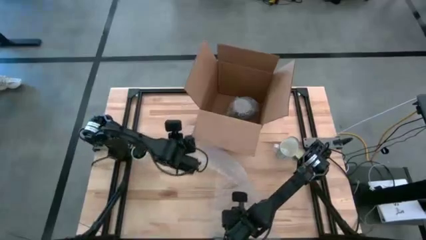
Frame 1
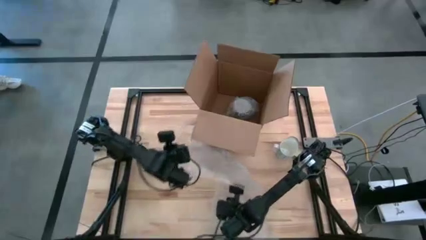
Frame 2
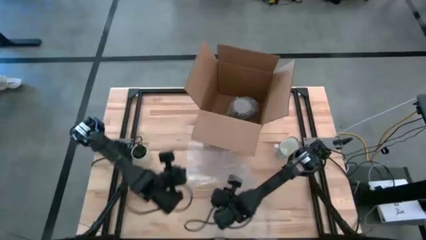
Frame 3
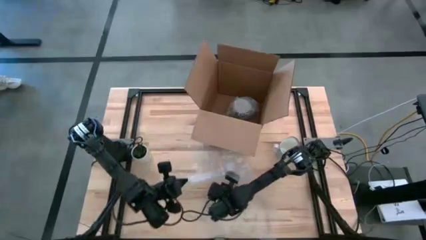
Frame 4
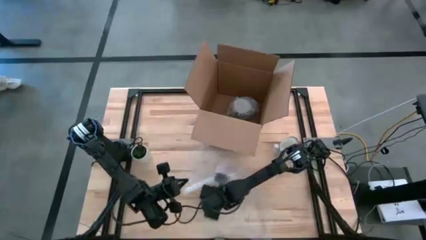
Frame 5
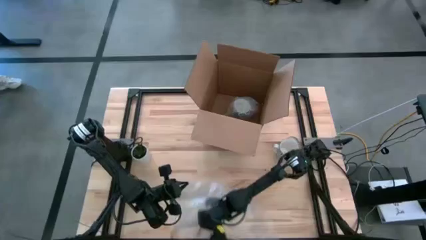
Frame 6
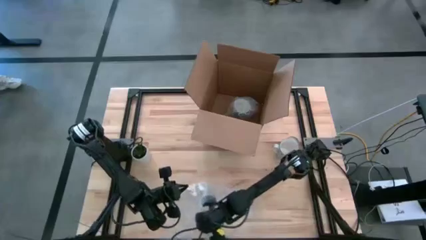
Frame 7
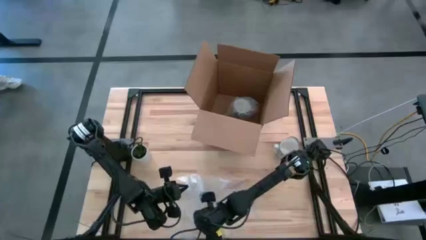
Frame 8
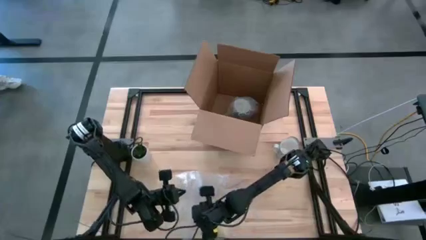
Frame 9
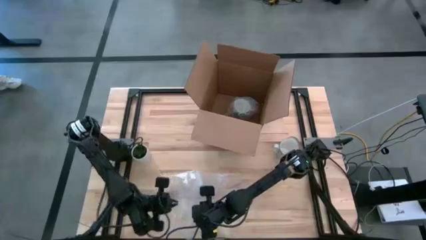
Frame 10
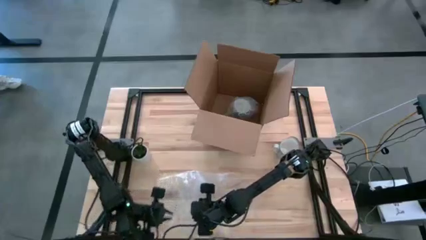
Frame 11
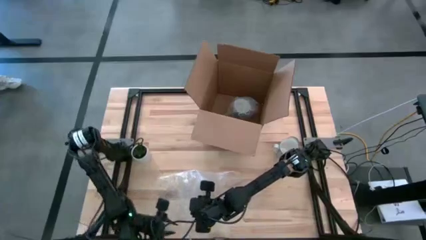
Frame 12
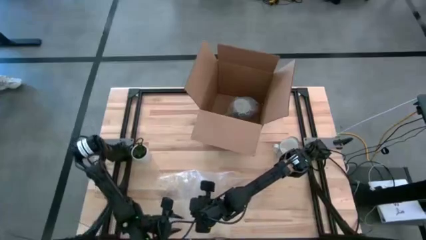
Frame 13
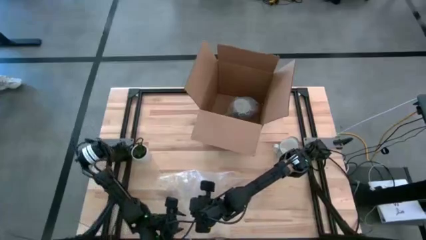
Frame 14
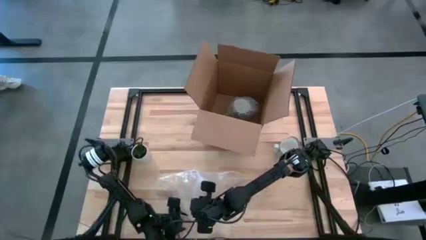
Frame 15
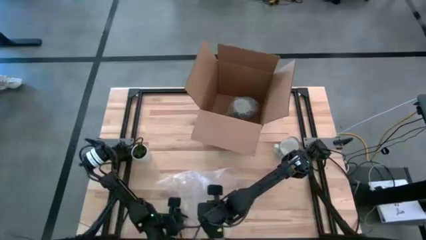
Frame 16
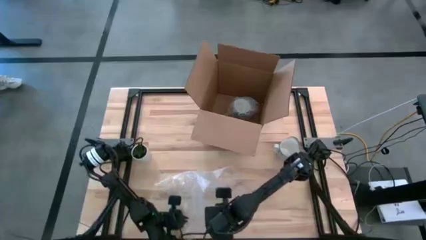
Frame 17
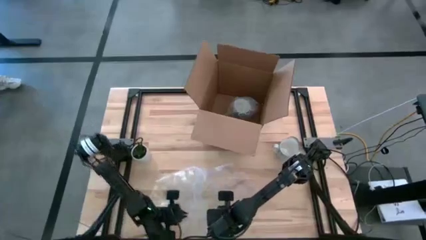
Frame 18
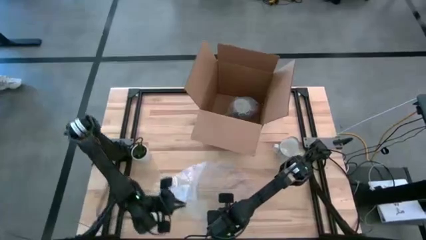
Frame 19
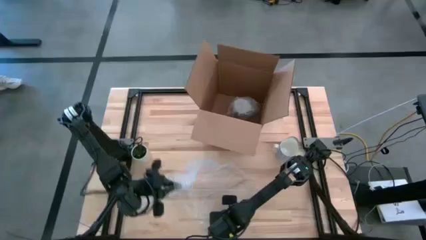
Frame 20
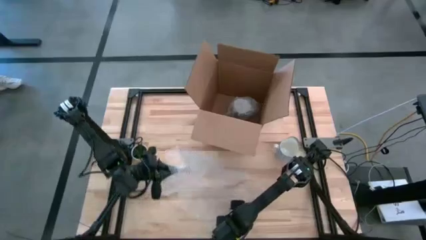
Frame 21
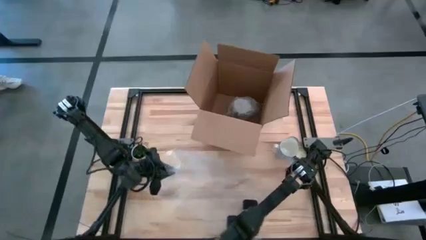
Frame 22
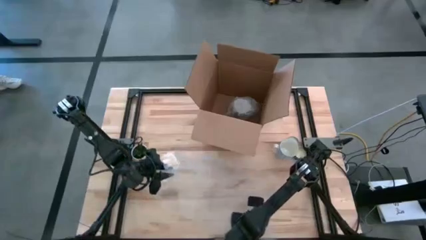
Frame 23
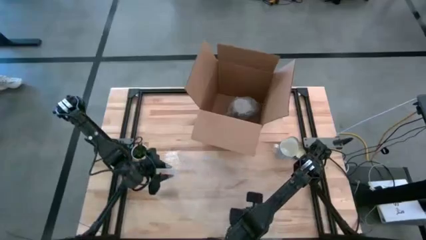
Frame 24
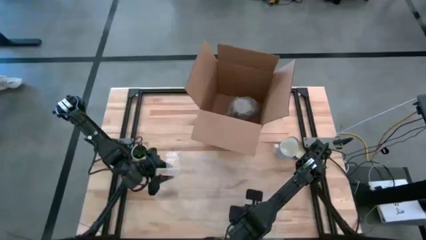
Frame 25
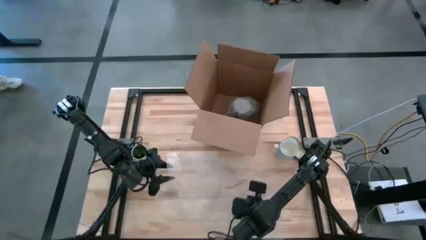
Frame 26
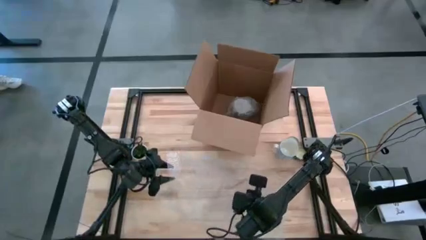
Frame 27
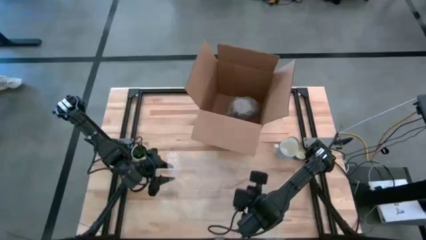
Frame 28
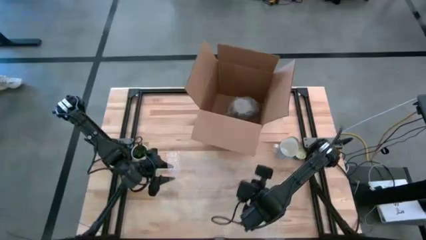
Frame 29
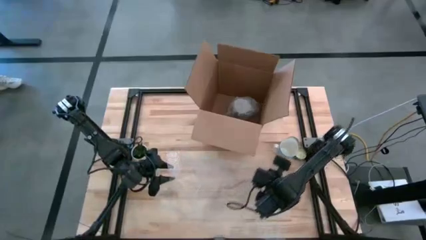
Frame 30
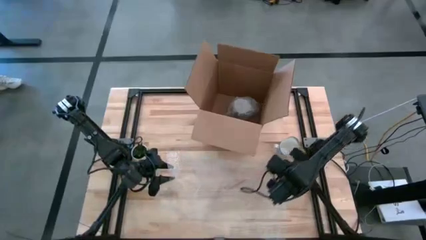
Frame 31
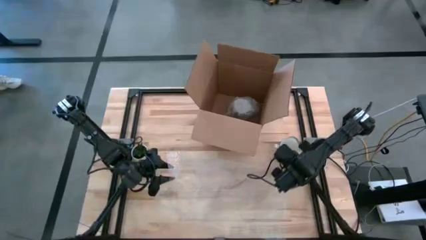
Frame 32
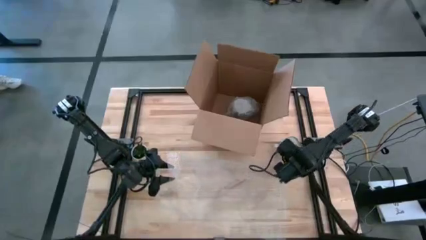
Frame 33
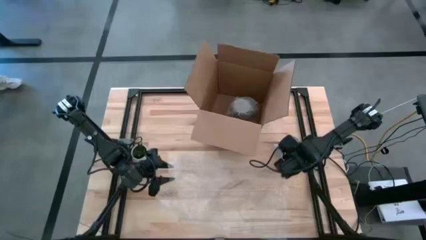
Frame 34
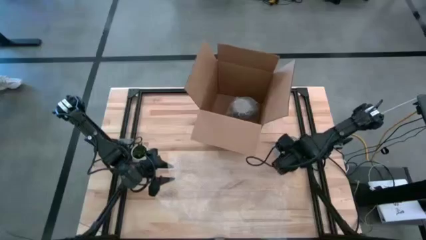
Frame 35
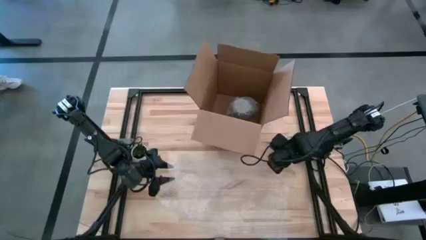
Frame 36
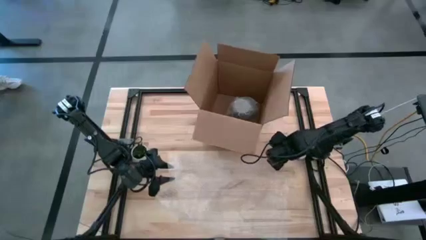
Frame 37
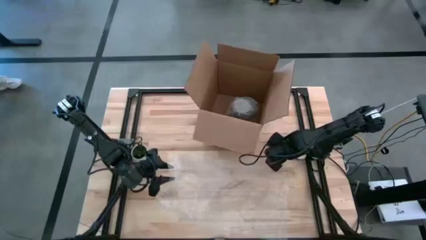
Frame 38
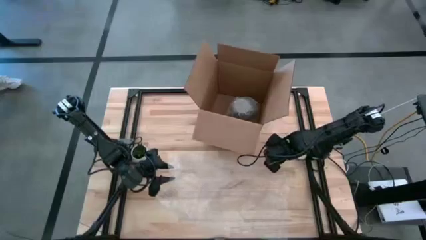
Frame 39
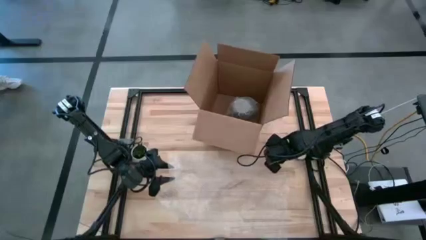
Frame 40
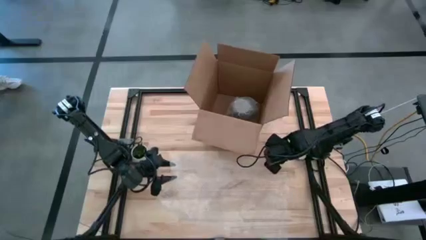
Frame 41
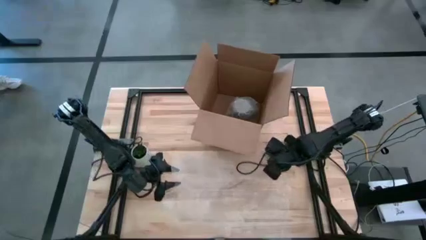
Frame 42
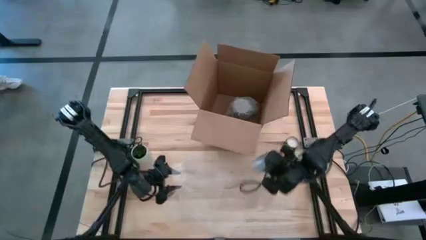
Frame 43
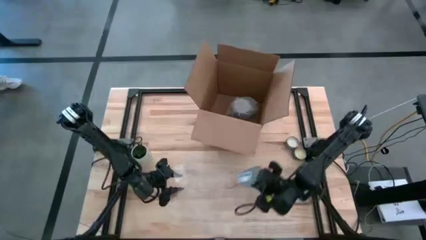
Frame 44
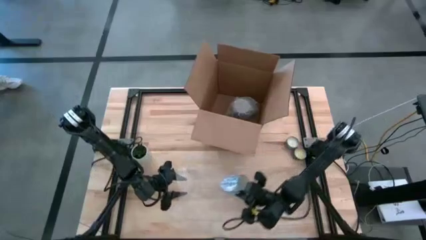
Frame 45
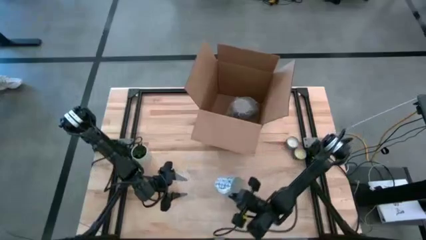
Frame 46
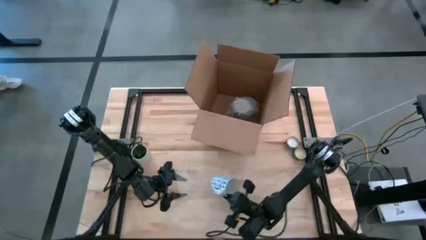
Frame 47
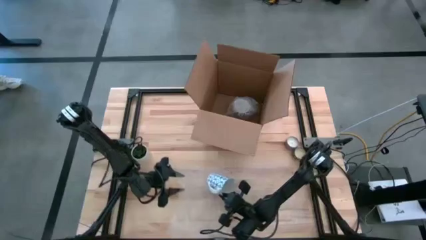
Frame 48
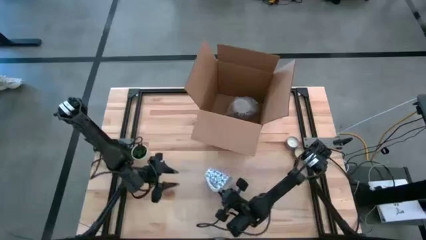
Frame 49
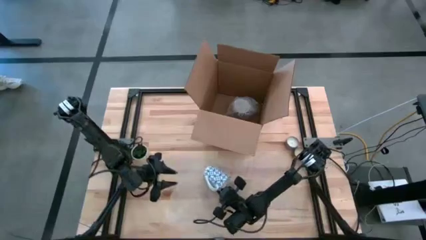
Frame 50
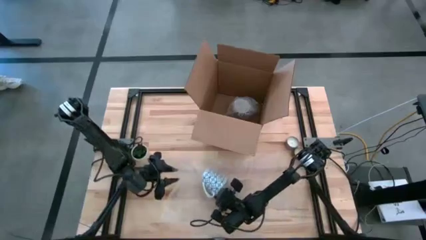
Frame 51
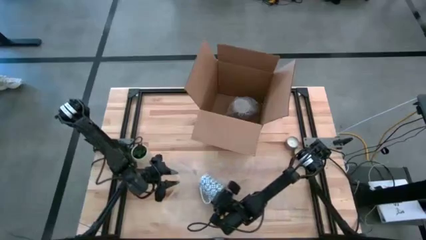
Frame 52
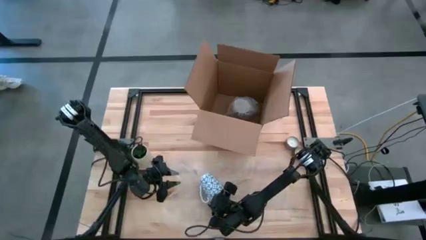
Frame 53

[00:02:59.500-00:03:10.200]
Task: wrap mug
Wrap the blue patterned mug with the bubble wrap

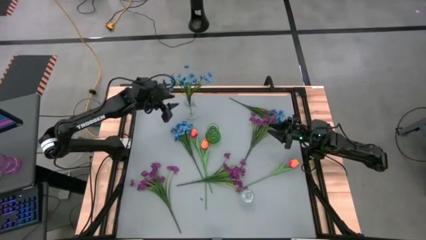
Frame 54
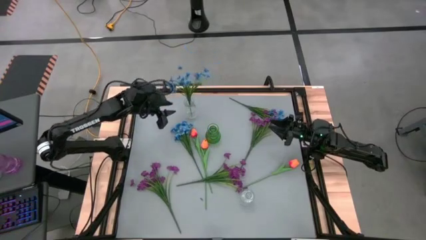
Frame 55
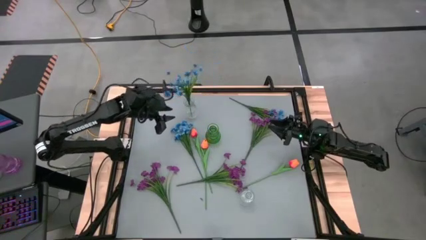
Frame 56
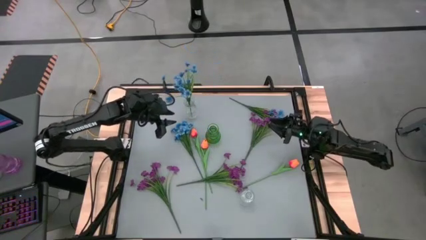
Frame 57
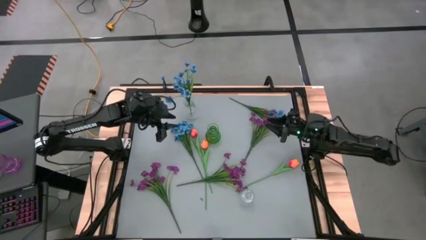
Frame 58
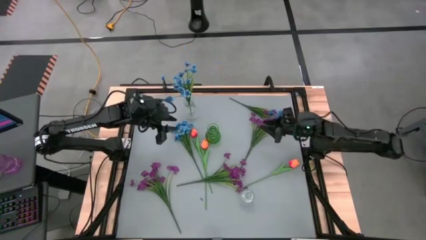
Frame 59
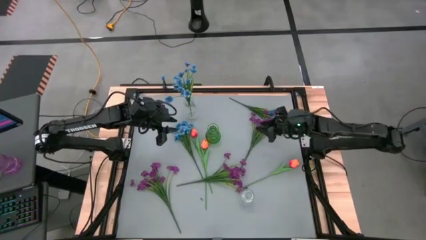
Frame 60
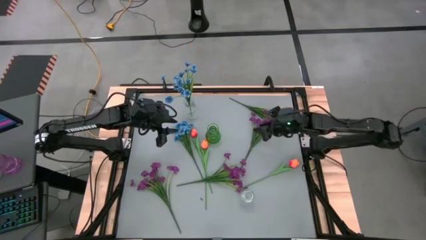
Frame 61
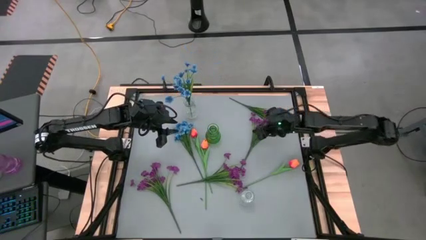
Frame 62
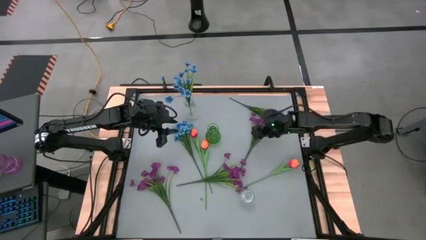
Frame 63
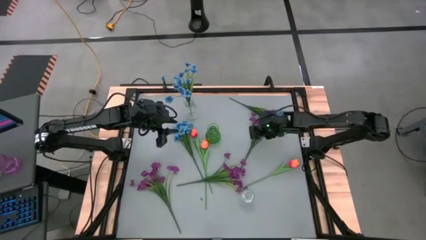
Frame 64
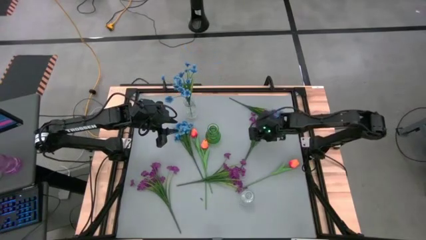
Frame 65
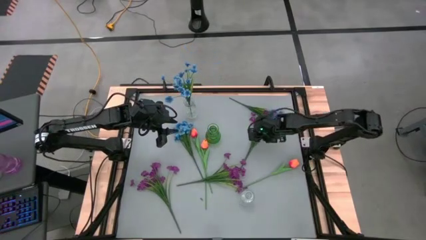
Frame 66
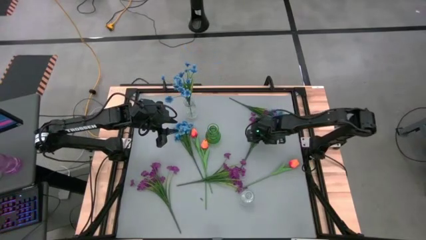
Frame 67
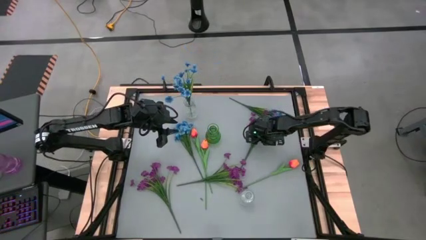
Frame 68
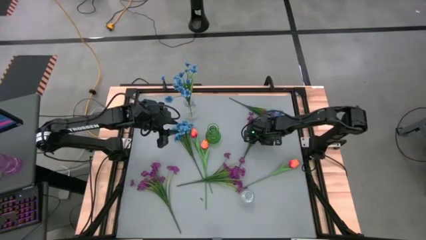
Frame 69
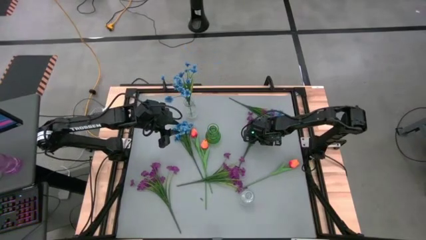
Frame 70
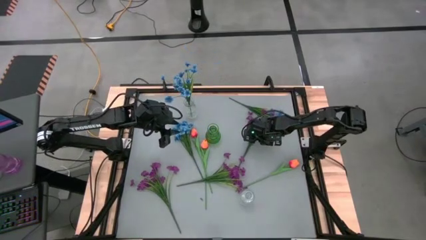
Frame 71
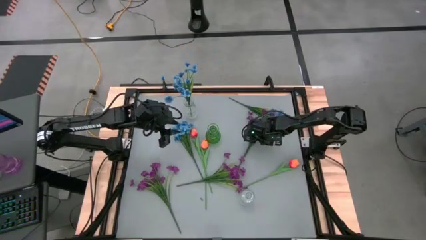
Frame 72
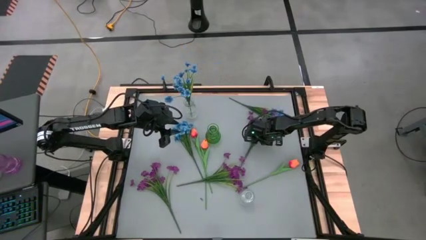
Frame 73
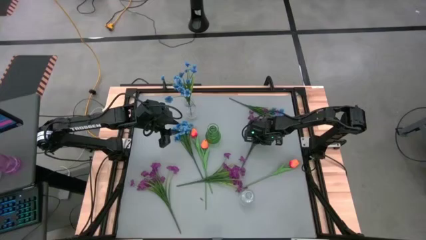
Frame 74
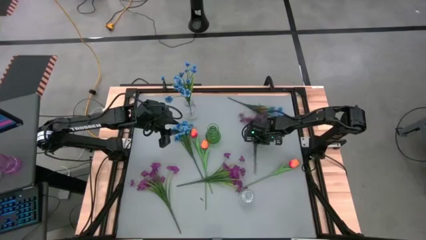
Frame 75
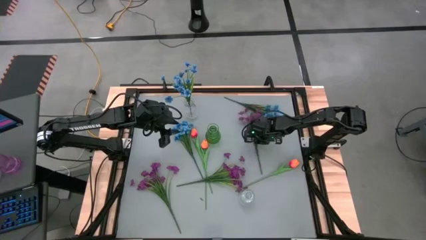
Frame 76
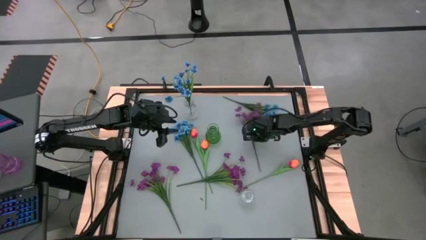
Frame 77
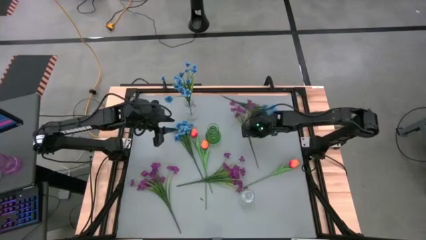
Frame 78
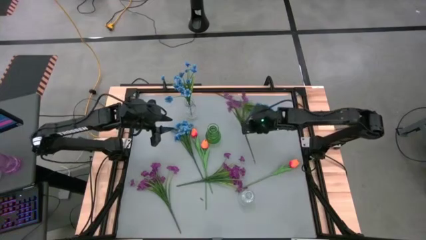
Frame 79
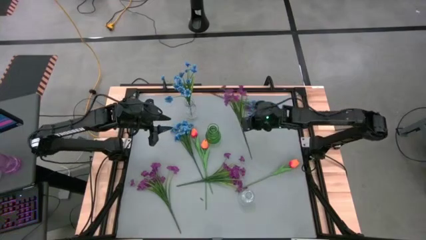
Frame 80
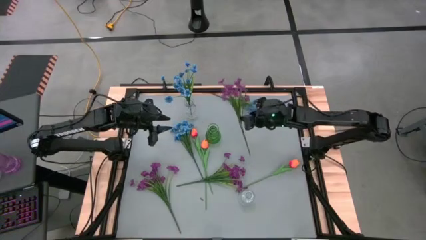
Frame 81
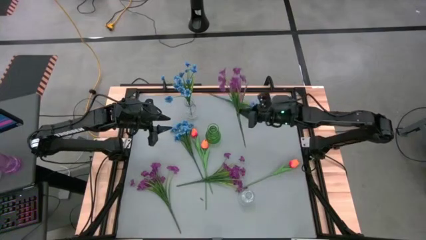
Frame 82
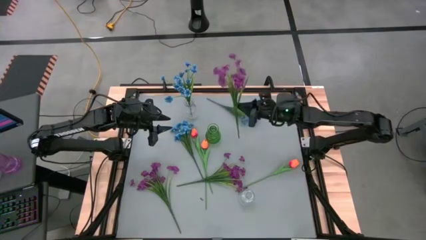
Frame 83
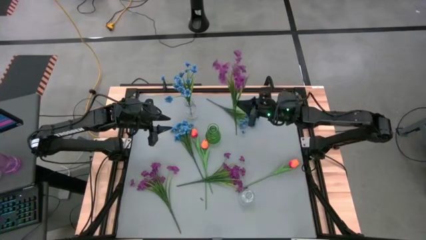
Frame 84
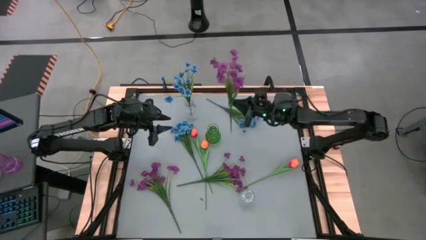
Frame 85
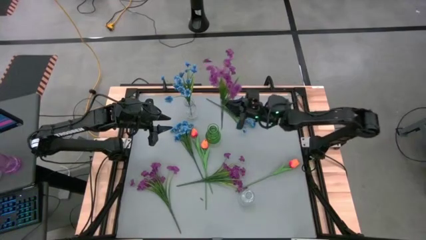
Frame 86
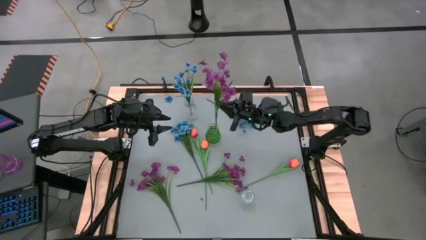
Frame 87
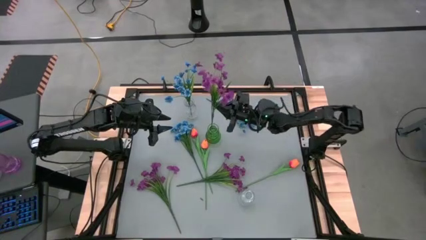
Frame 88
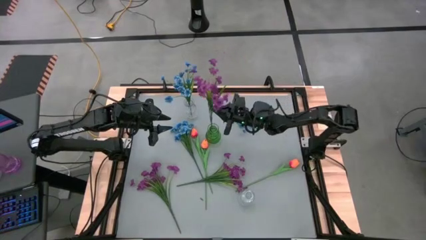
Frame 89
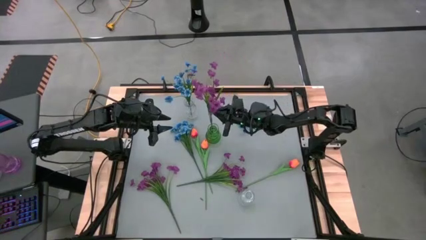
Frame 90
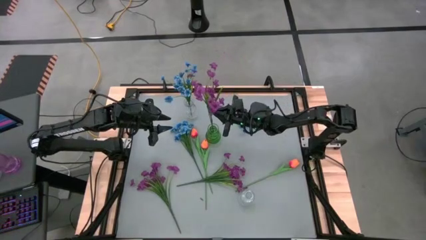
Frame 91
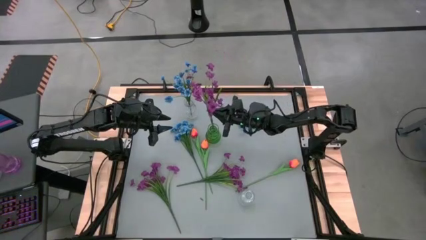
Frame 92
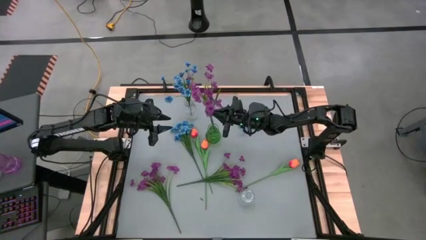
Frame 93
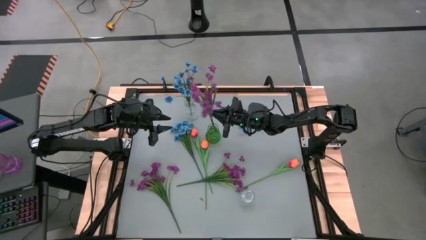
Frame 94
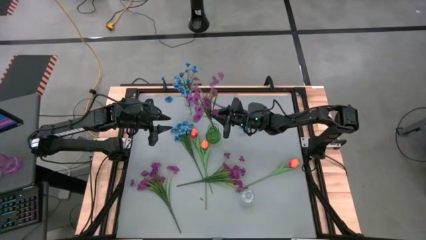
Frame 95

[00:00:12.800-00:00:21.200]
Task: Sort flowers into vase by color
Put the top violet flowers into the green vase
